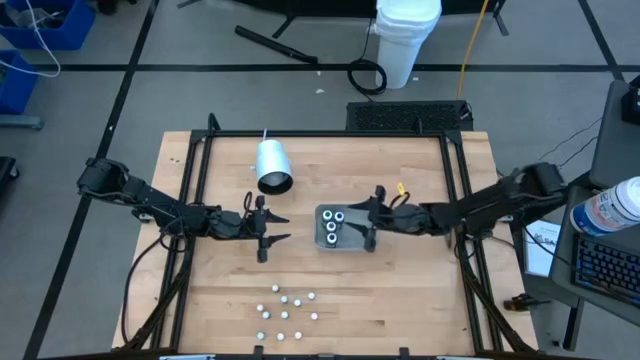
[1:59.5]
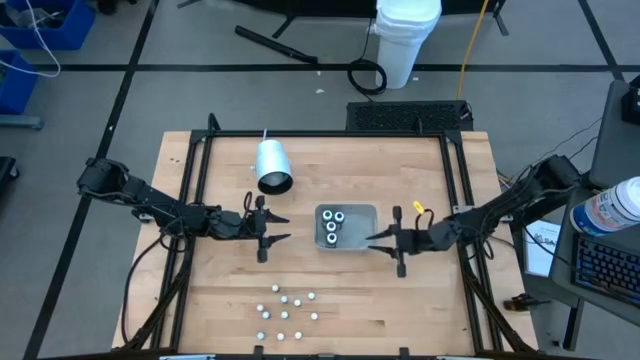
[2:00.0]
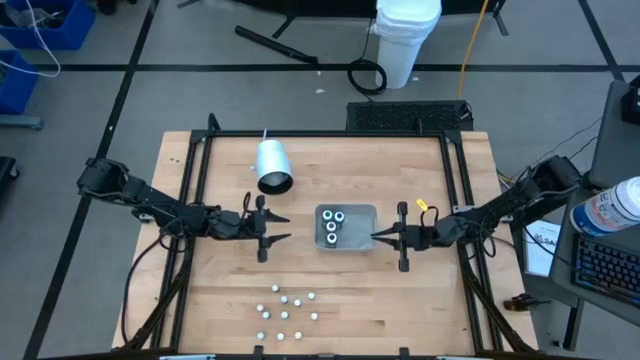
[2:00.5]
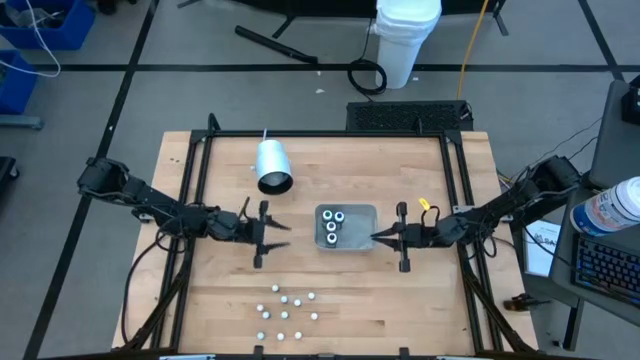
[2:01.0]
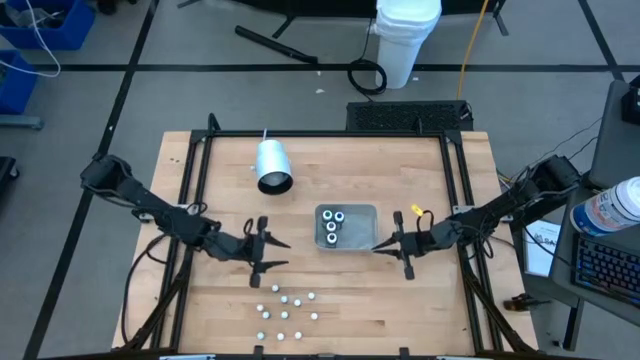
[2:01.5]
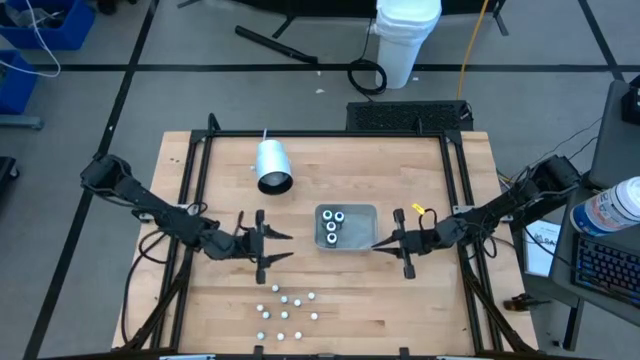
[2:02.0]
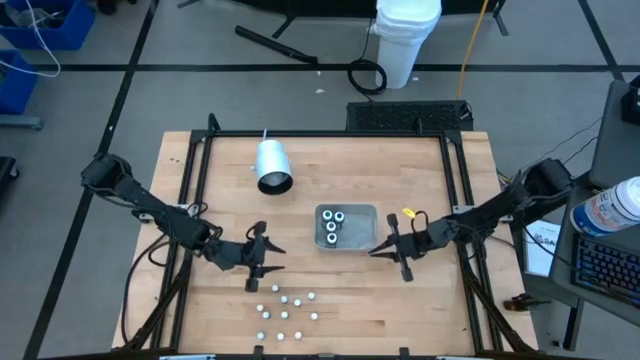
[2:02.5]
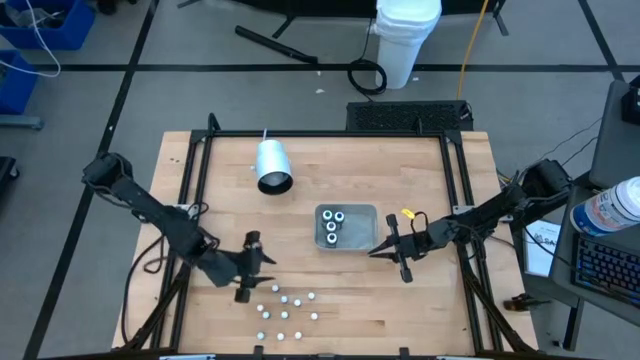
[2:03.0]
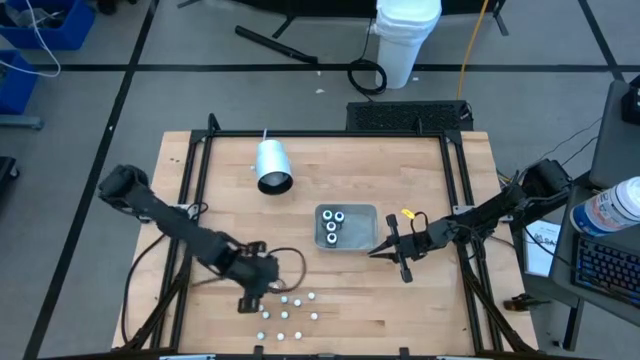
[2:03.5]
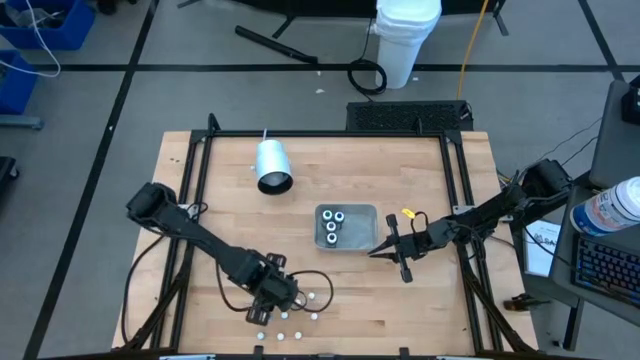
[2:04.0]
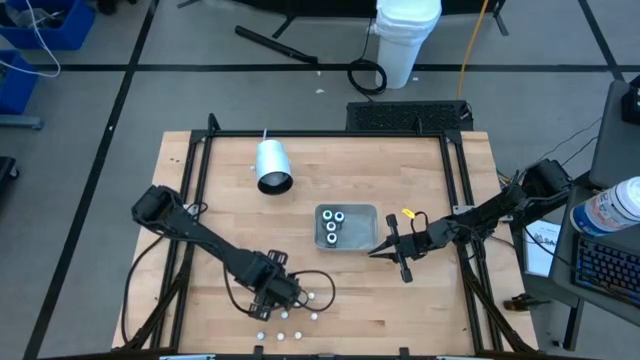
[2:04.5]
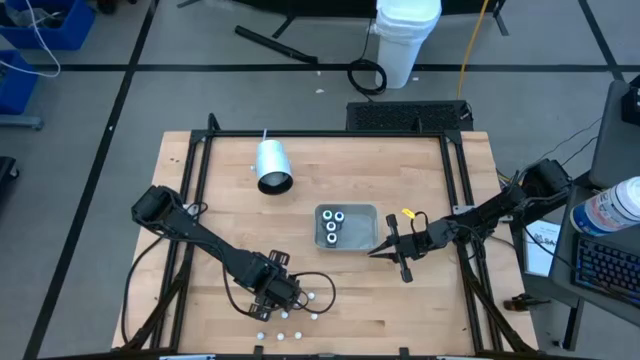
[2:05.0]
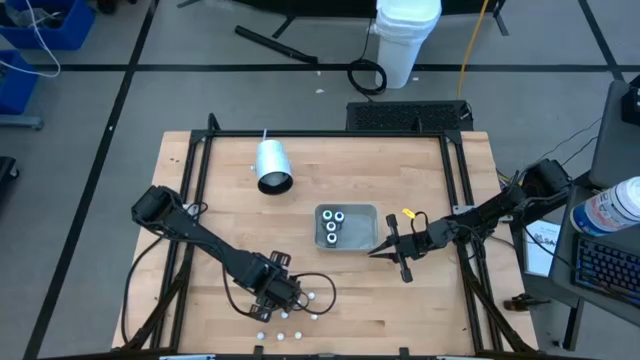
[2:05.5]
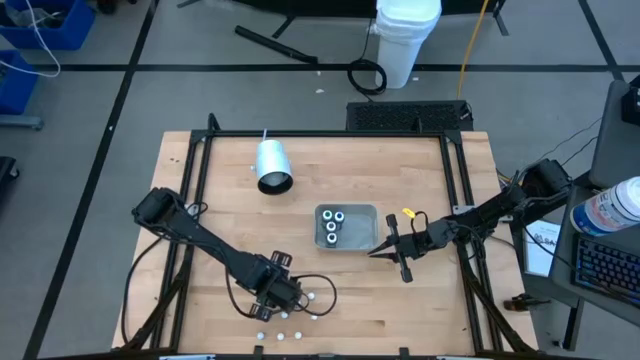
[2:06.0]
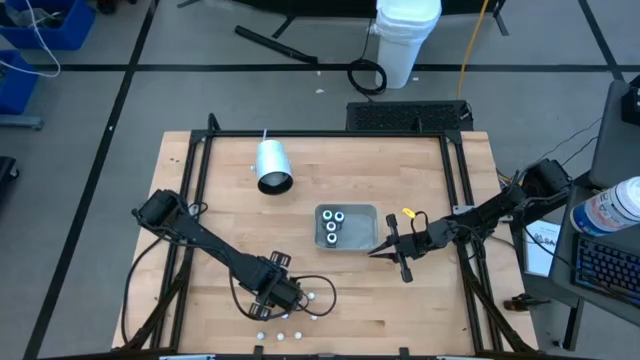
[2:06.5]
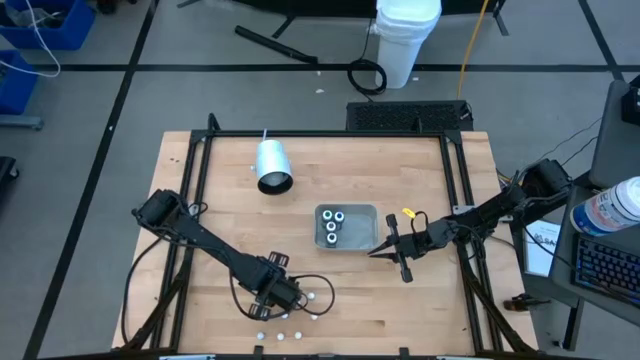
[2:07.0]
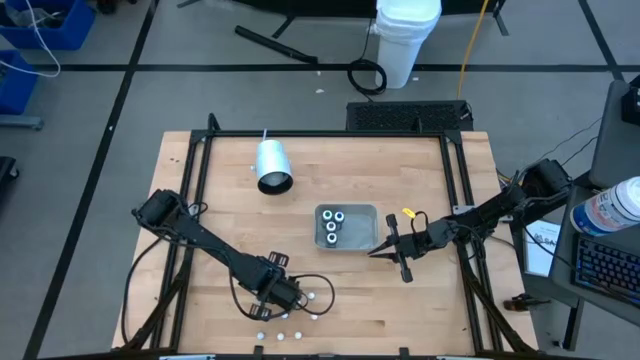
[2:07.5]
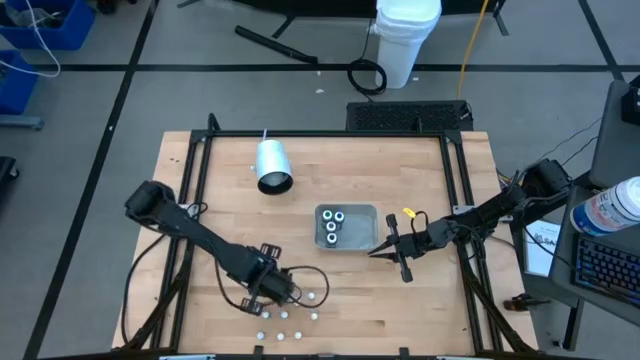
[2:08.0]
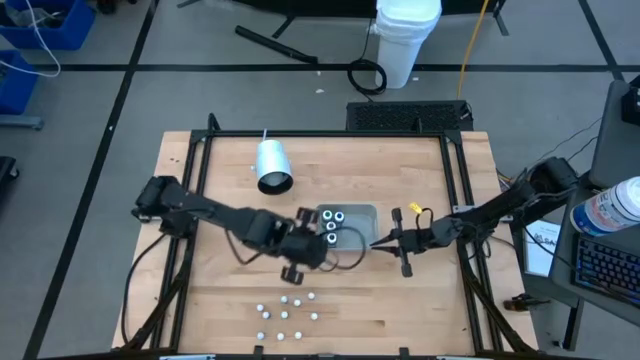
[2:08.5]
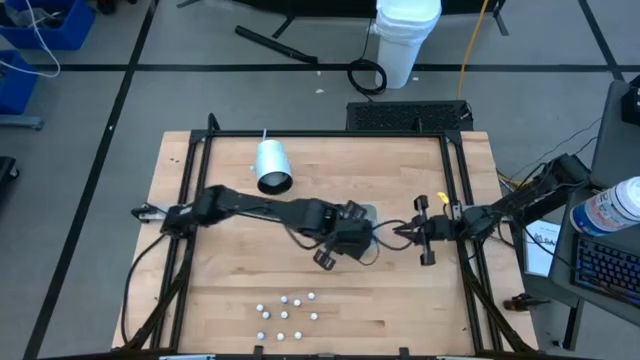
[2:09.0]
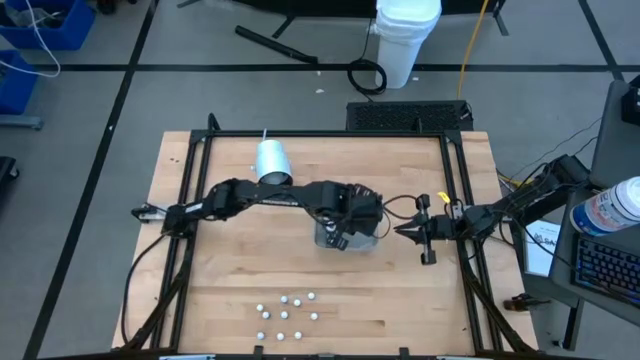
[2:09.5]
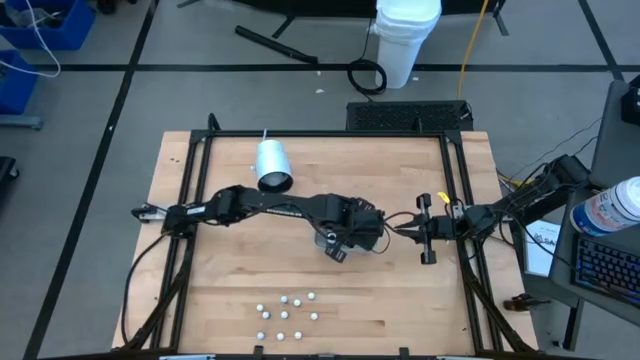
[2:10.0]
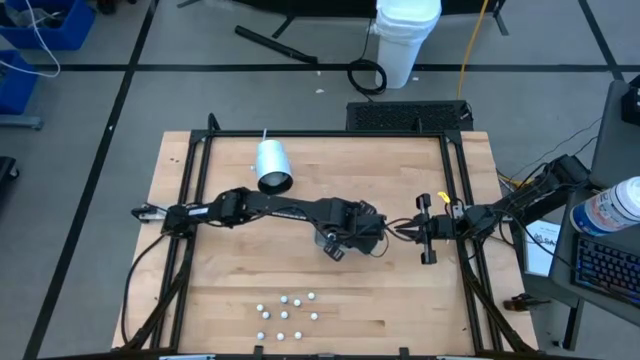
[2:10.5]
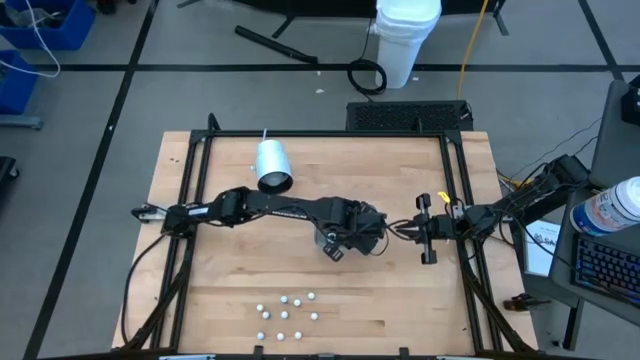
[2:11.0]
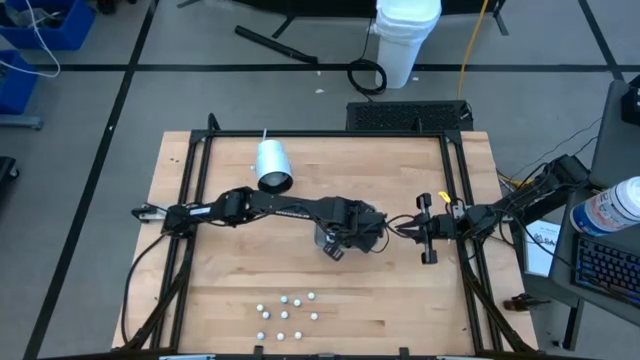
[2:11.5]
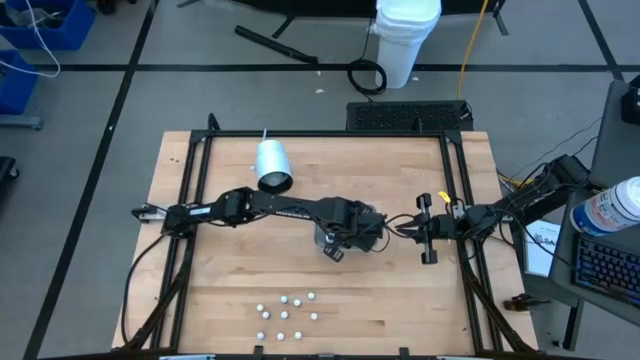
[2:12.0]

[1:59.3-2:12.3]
Task: Pick & Place food coloring
Put the small violet food coloring bottle into the white bin

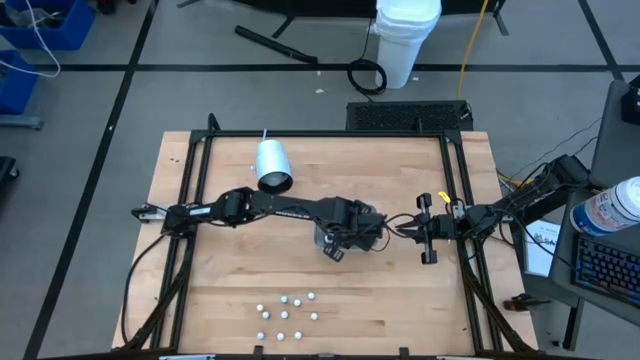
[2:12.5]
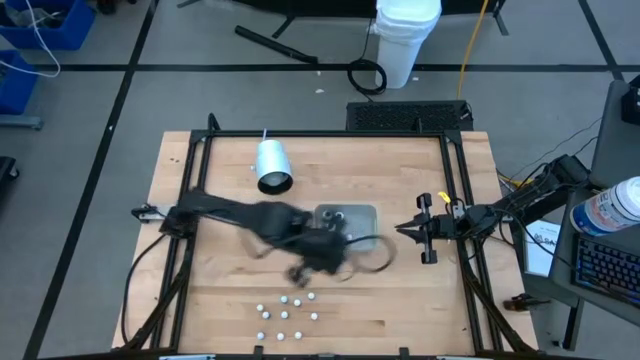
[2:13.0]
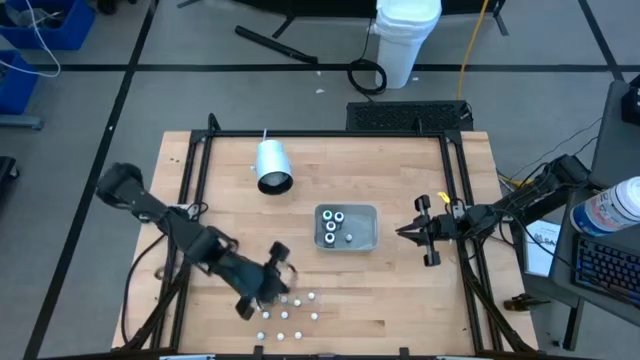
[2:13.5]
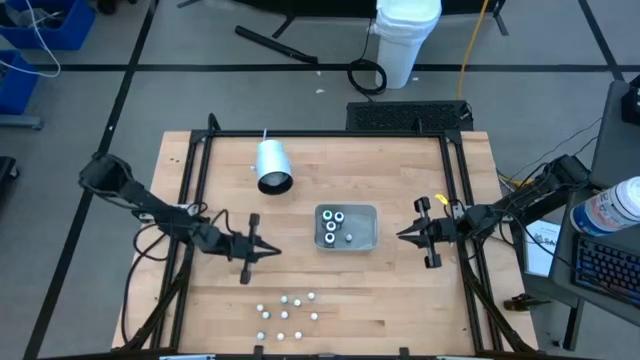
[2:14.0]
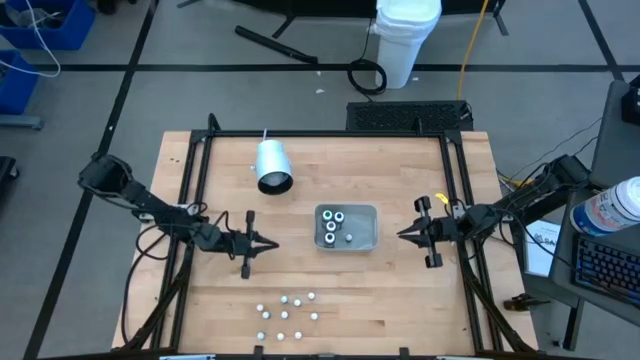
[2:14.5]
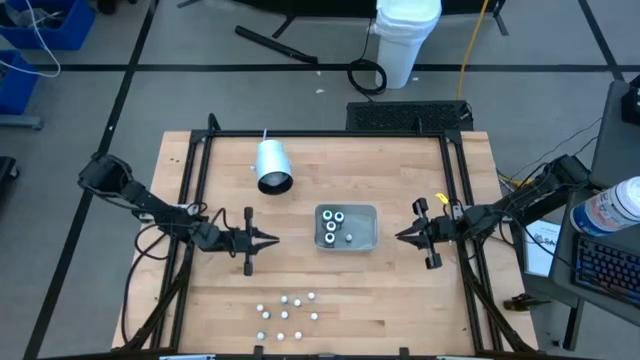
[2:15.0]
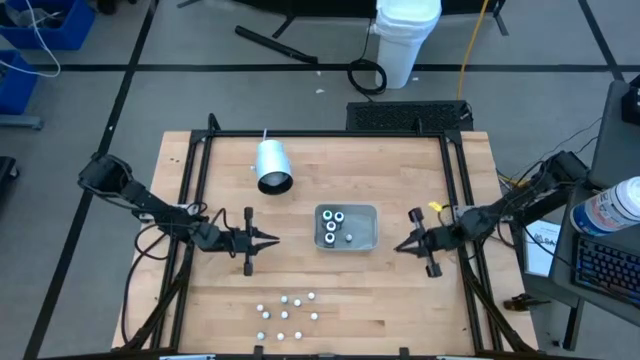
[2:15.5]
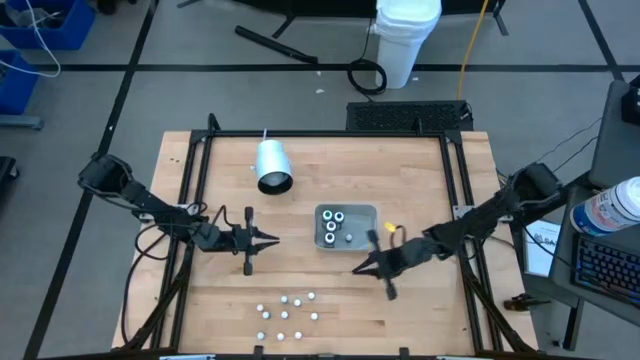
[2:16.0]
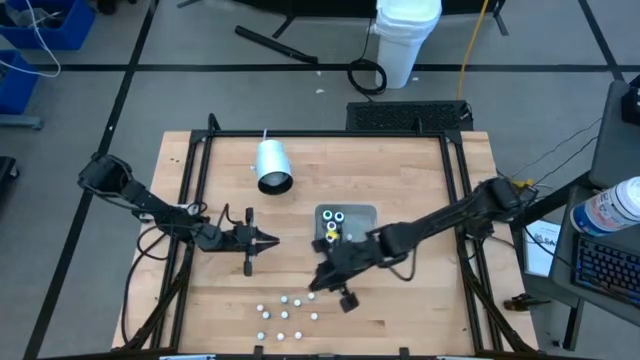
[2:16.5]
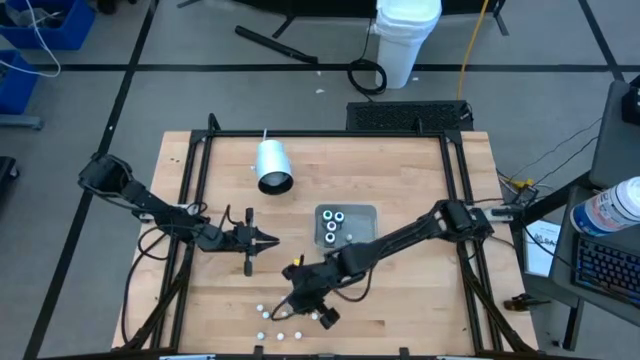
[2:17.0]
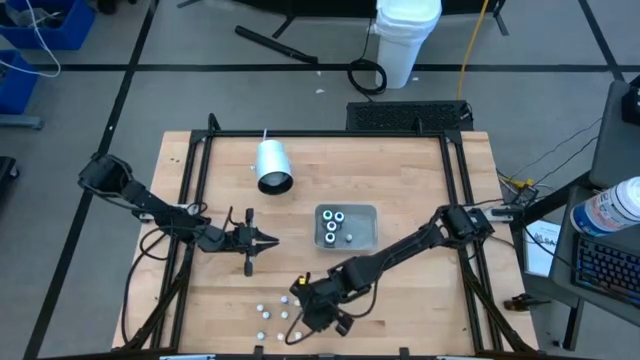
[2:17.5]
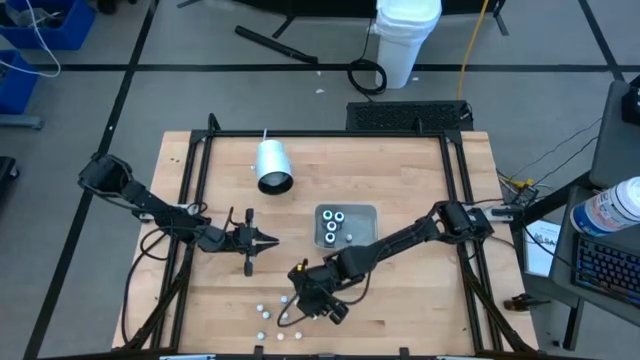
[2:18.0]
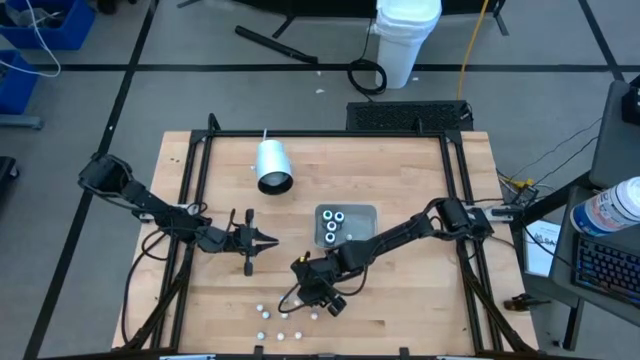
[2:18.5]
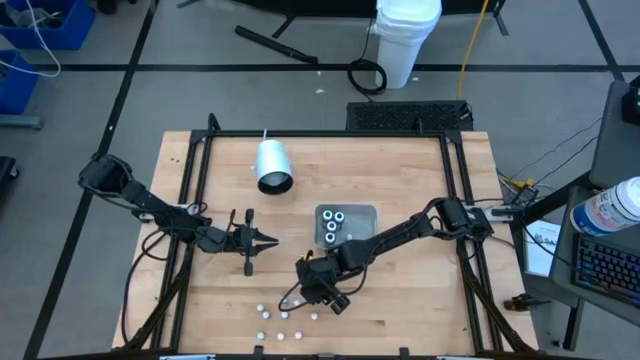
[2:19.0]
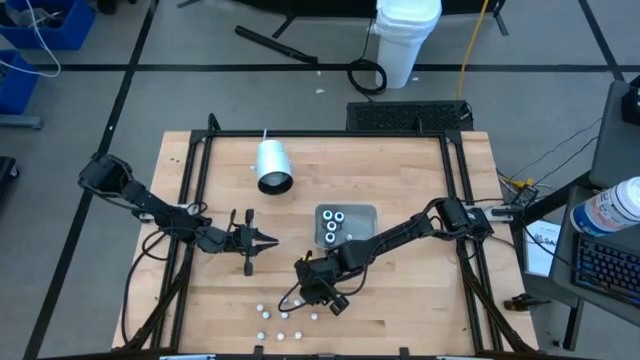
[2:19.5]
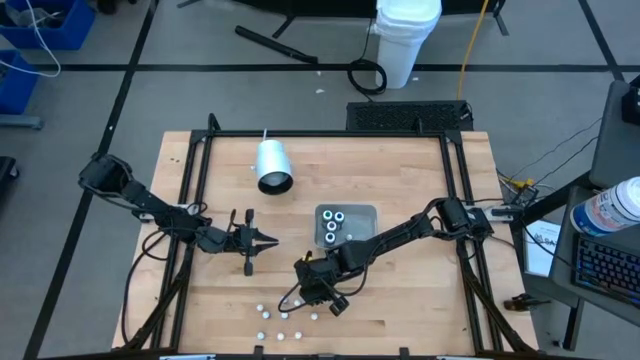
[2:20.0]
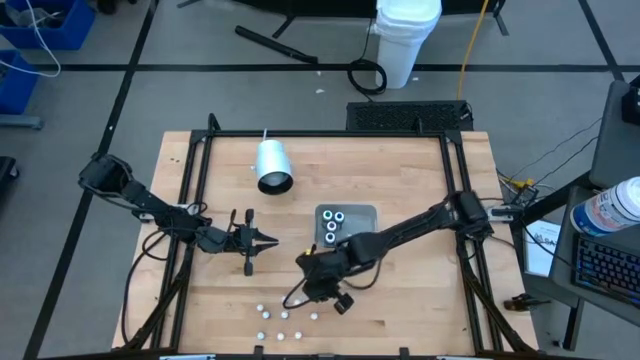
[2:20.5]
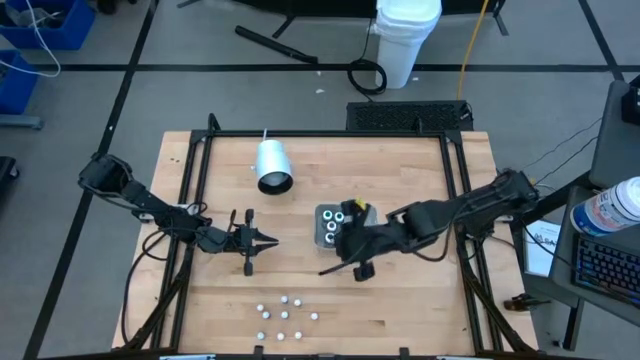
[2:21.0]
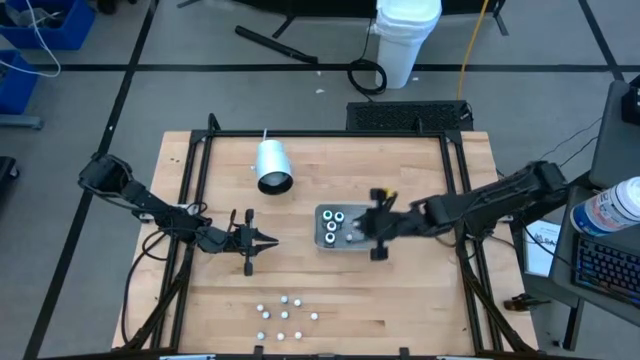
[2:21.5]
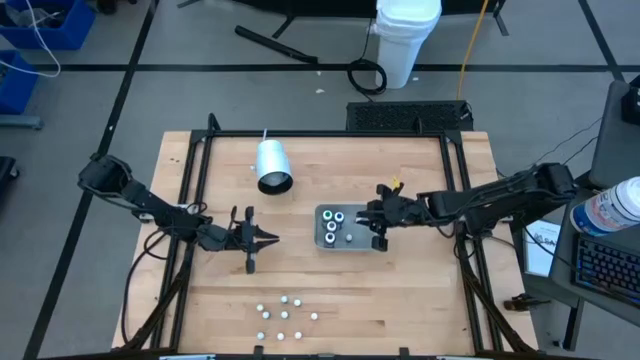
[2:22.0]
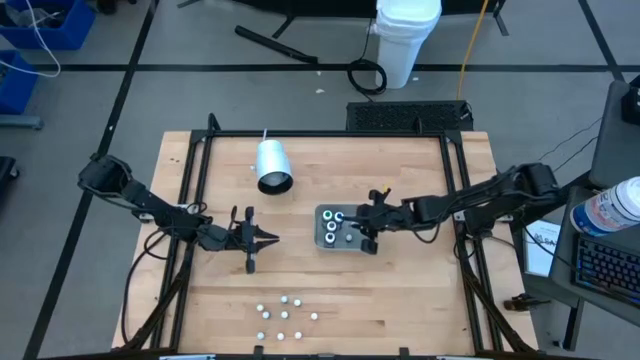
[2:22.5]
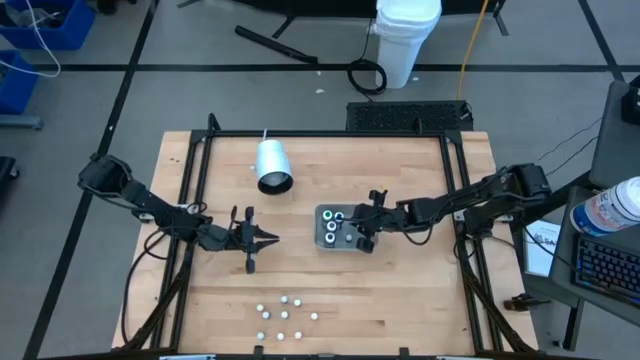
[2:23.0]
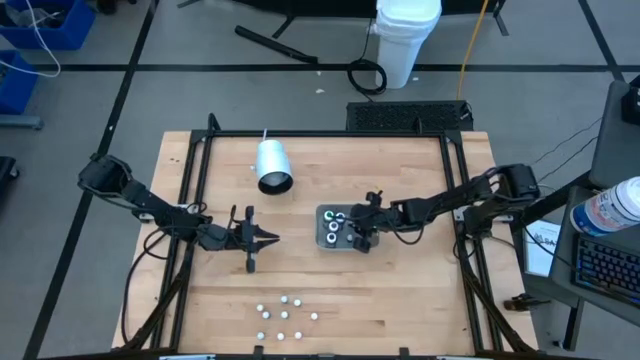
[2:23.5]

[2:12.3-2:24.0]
Put the right small red food coloring bottle into the white bin
